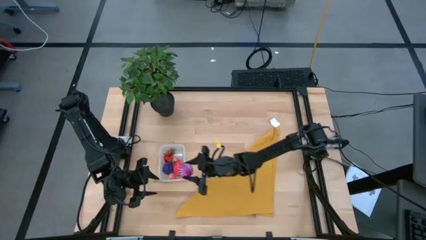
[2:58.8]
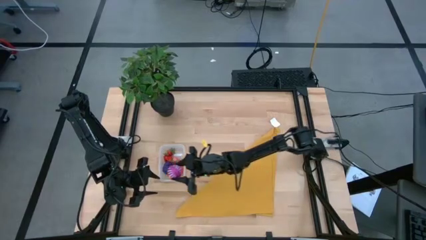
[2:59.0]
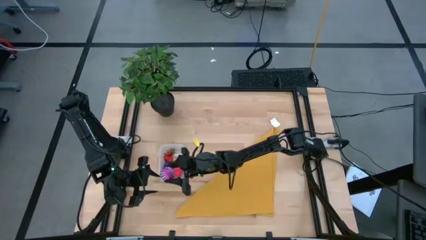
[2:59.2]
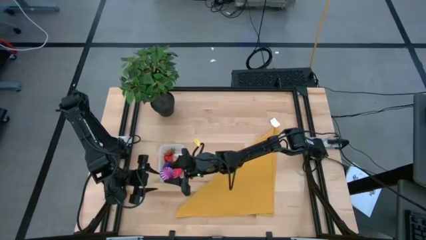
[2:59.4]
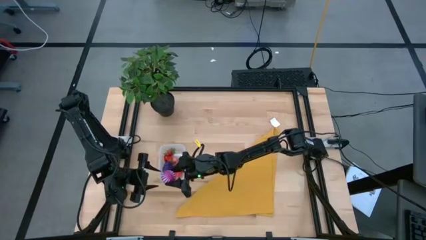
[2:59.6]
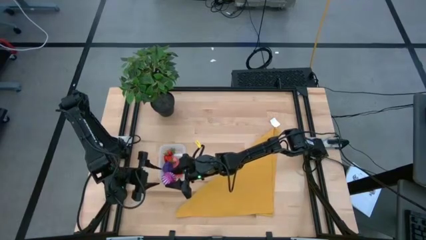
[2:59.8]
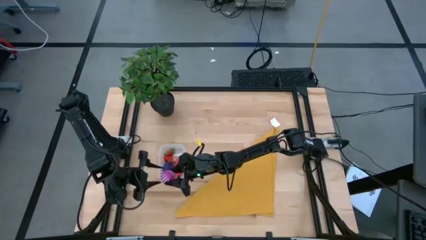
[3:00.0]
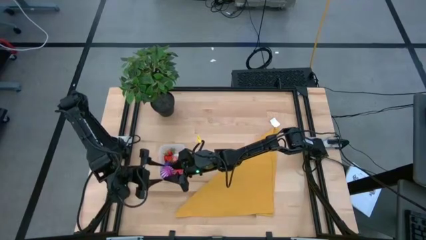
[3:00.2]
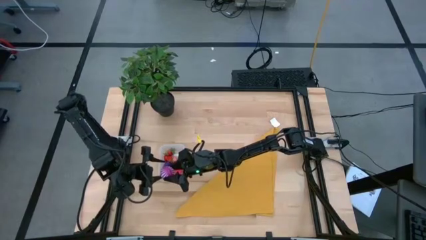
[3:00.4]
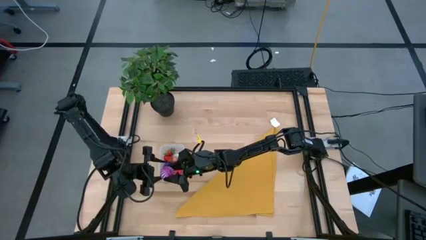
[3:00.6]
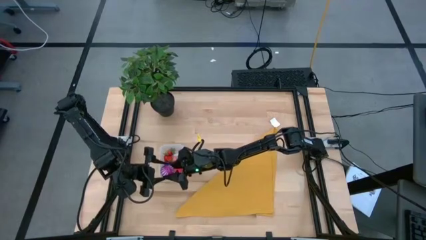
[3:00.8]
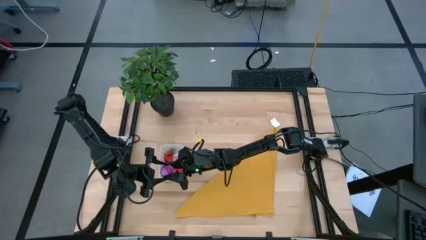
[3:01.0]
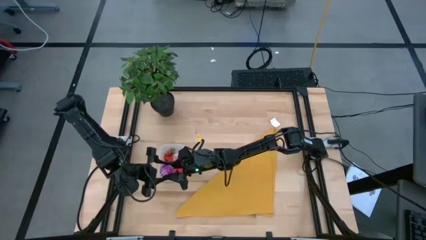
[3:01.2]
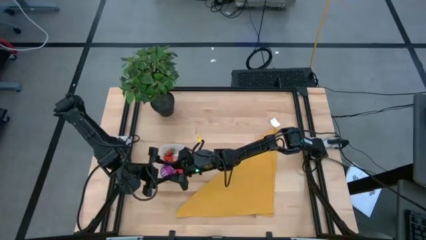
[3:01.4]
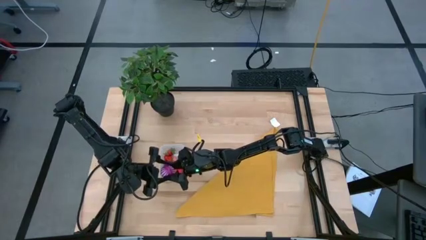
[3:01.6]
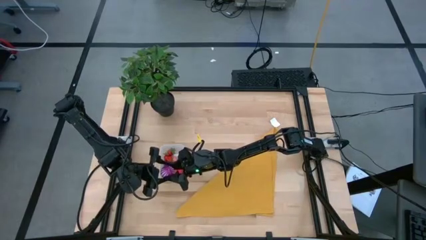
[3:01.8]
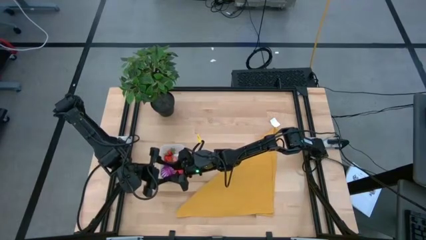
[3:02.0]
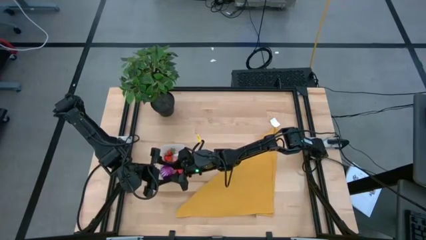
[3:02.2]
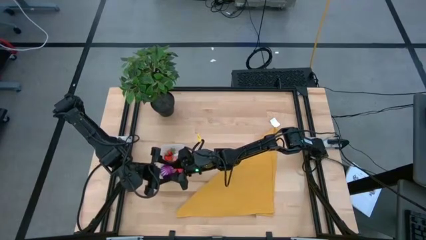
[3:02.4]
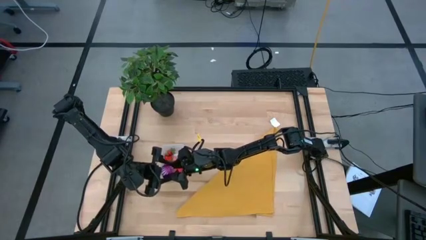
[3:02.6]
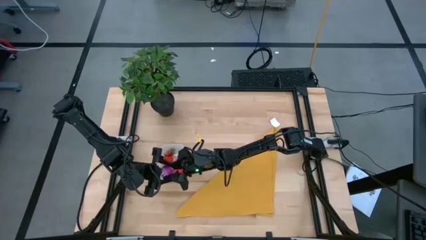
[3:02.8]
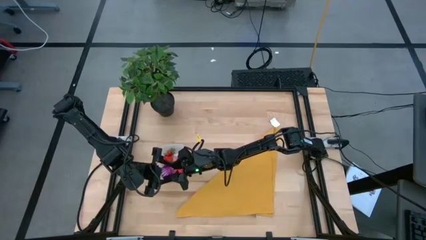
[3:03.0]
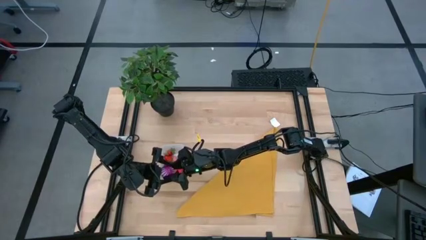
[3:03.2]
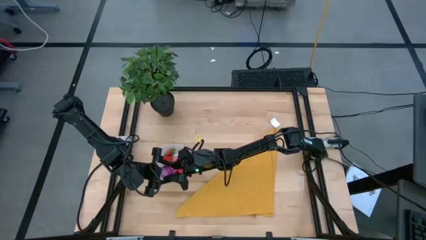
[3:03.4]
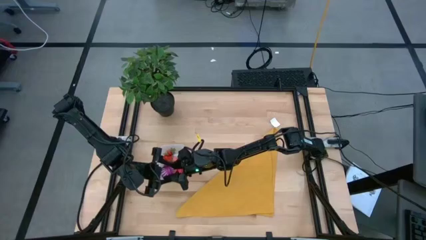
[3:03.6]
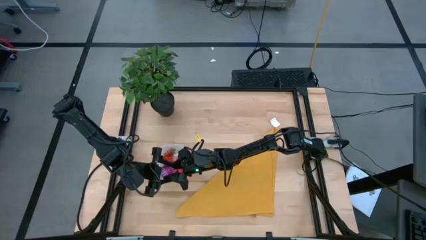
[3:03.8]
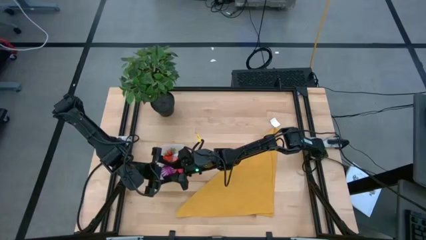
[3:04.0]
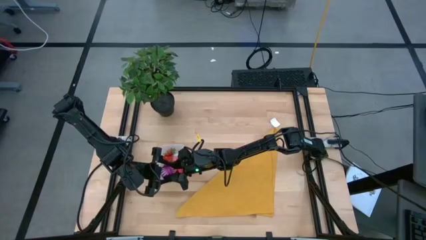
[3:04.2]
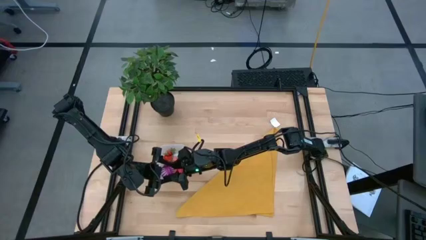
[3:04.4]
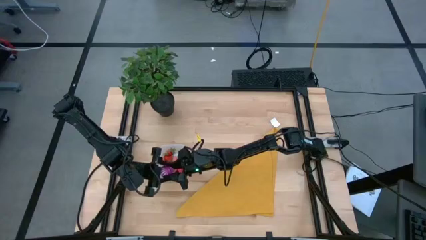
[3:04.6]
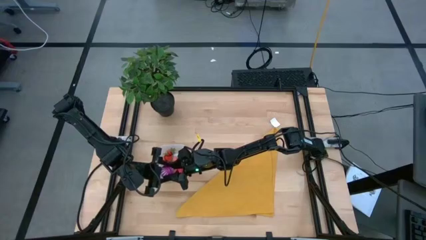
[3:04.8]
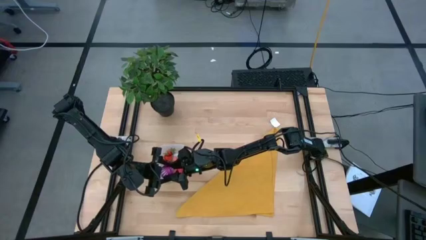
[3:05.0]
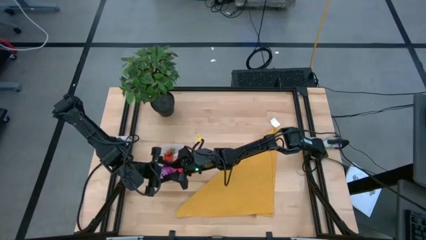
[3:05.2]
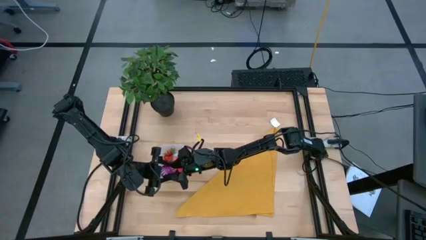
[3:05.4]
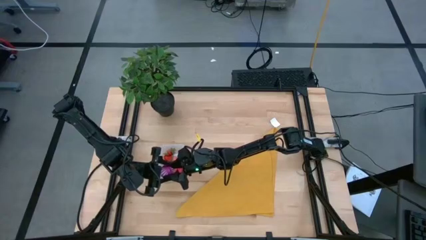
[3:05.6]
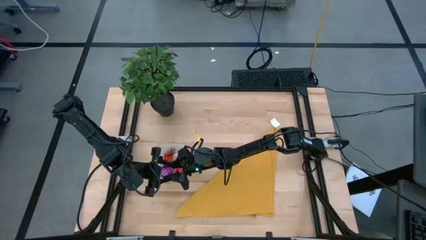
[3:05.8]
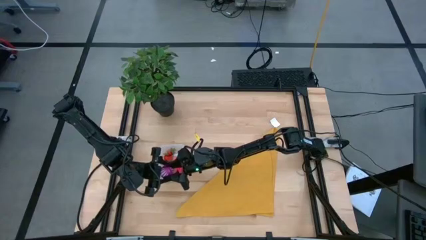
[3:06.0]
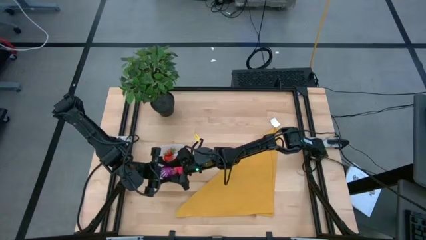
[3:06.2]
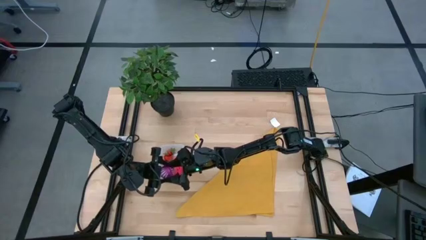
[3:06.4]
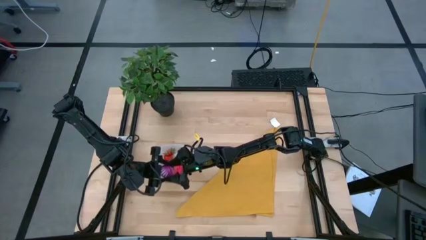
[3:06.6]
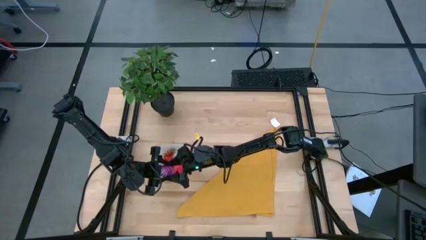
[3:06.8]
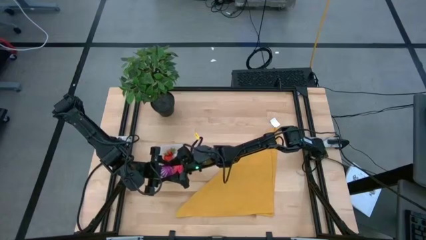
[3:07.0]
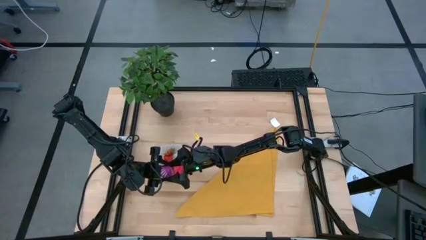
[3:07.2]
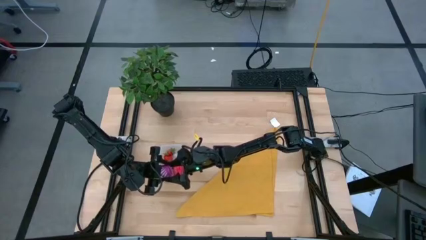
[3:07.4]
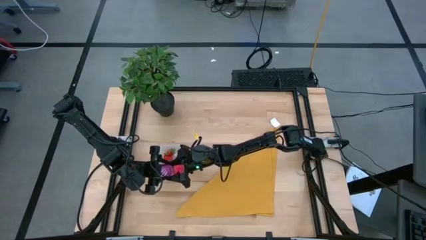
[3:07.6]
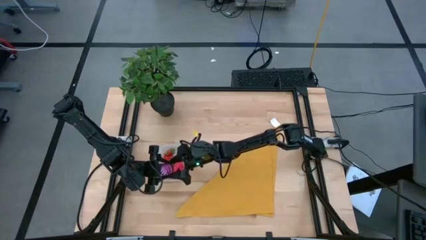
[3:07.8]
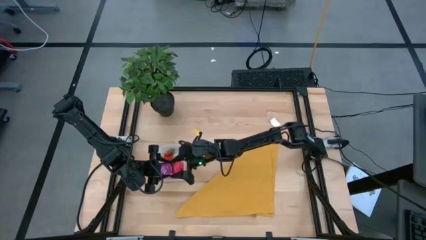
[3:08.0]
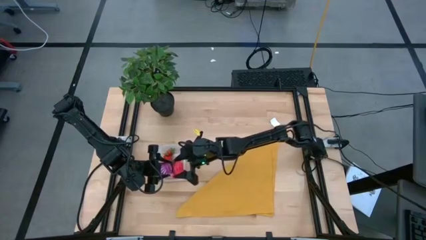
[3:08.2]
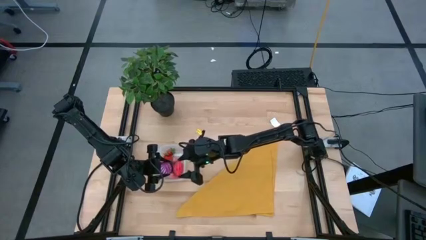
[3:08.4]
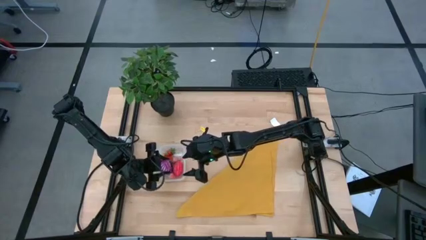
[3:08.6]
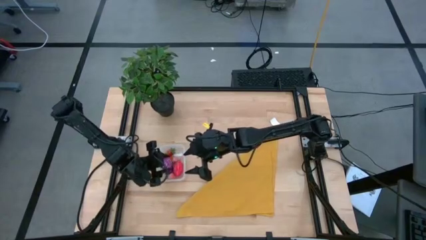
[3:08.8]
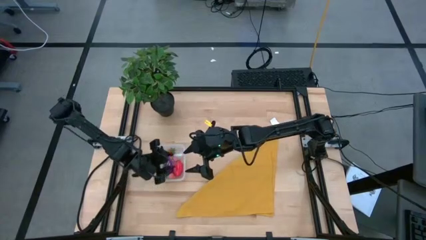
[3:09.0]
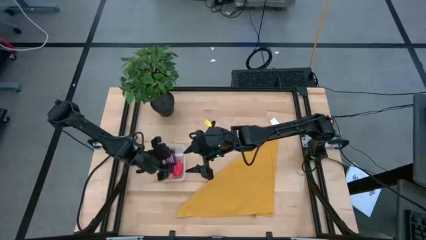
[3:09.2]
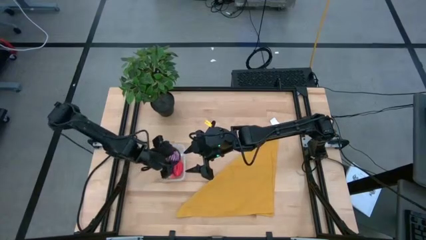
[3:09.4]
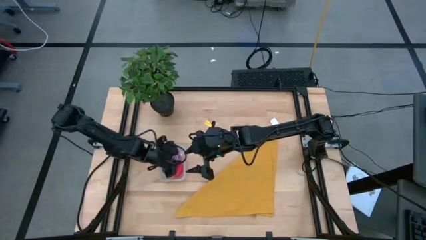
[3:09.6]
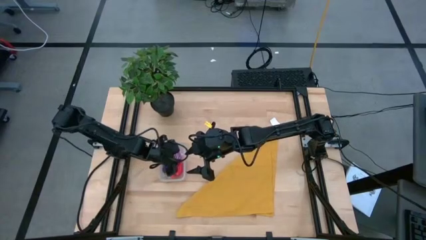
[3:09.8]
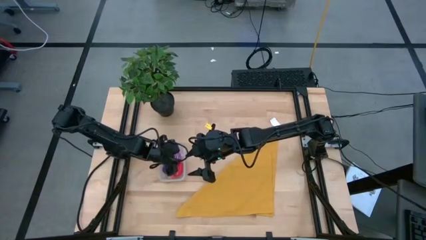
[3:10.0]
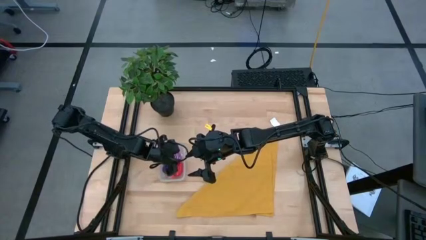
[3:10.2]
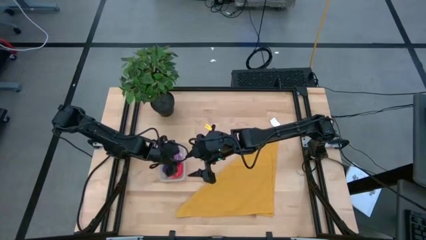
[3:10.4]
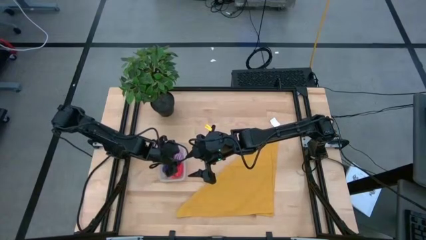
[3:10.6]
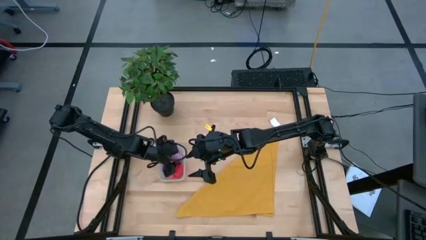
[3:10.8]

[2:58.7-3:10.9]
Task: Pick and placing Produce into tupperware
Put the purple onion into the transparent bin
